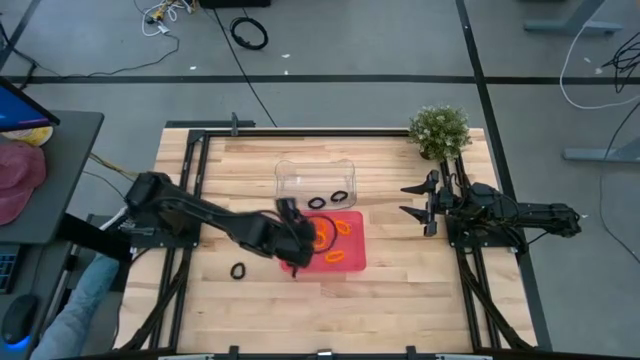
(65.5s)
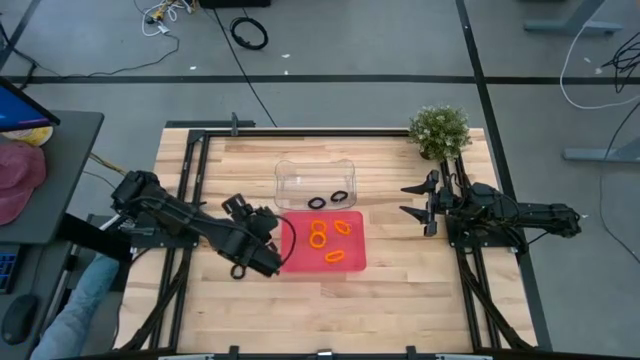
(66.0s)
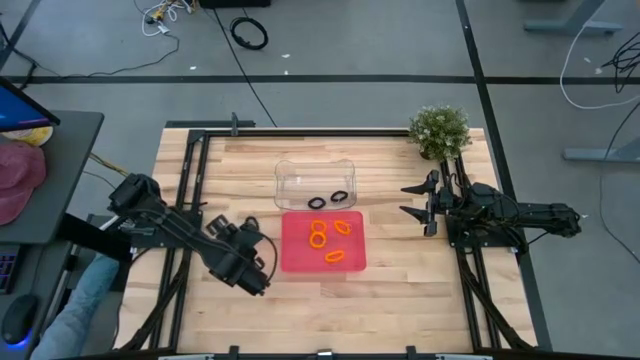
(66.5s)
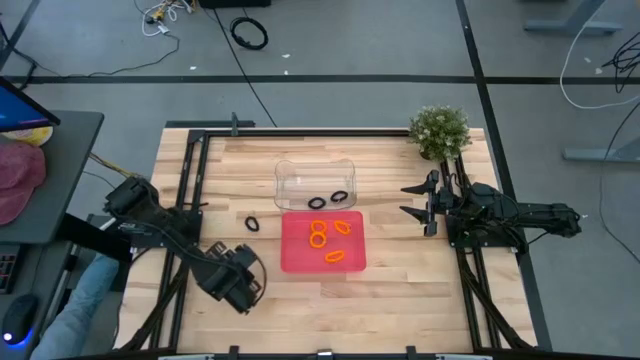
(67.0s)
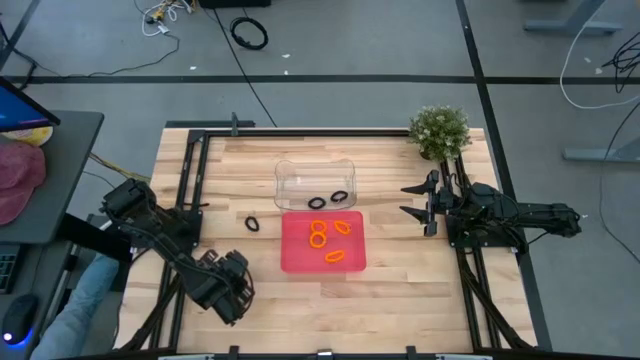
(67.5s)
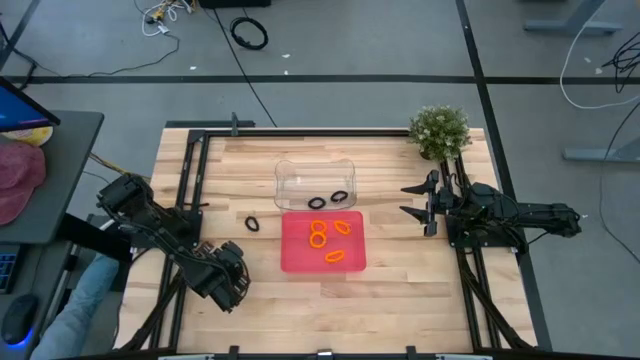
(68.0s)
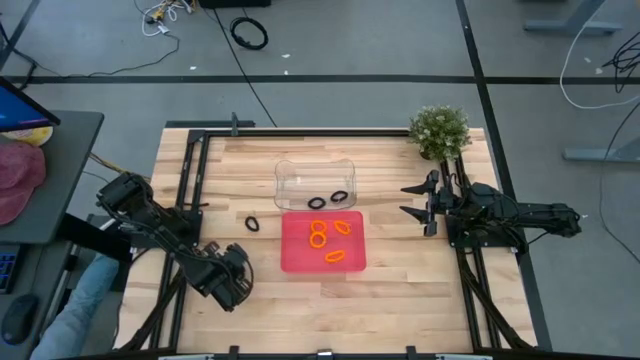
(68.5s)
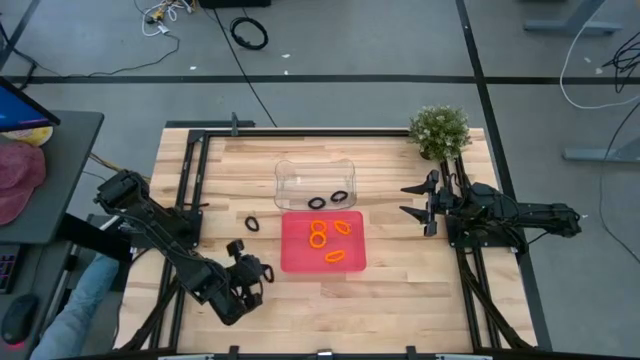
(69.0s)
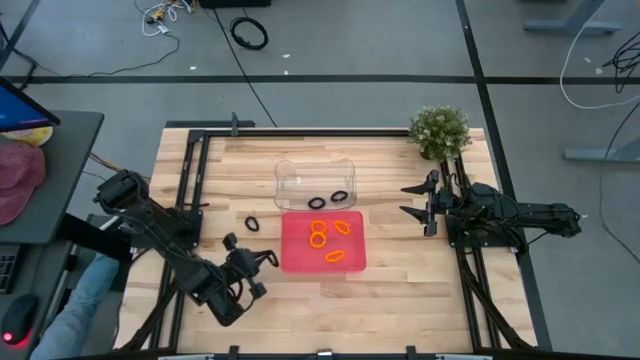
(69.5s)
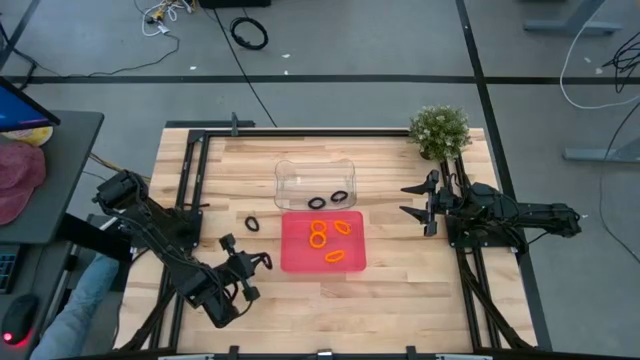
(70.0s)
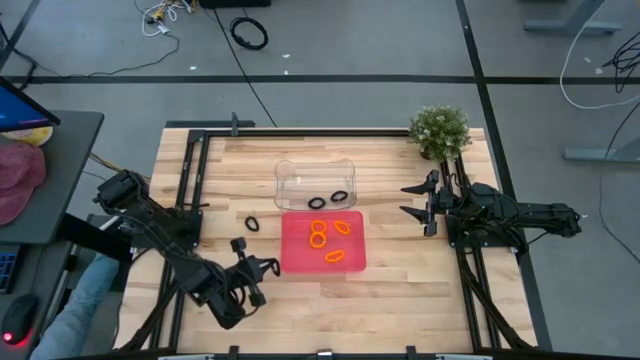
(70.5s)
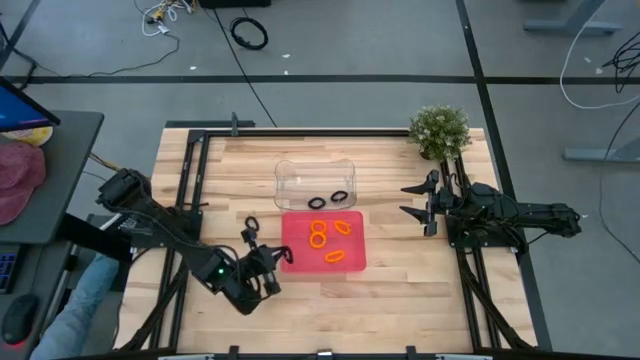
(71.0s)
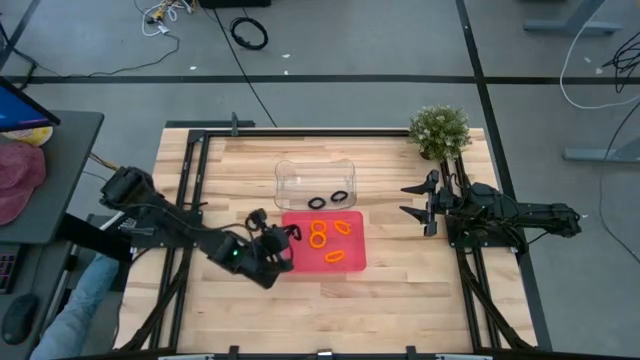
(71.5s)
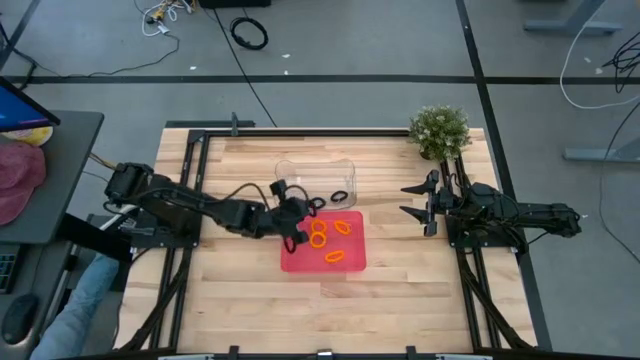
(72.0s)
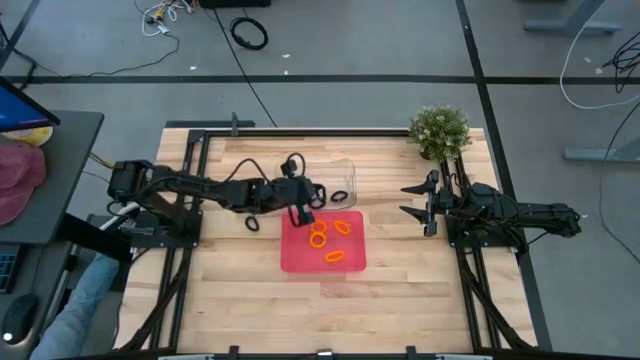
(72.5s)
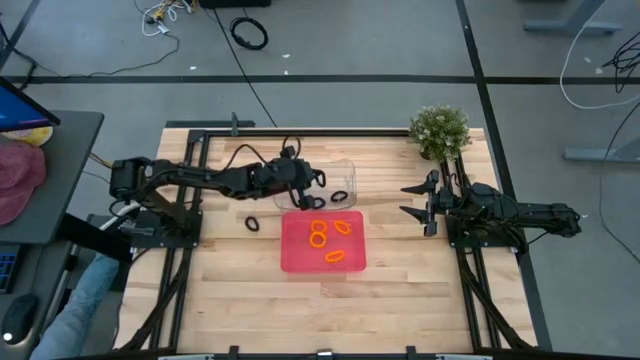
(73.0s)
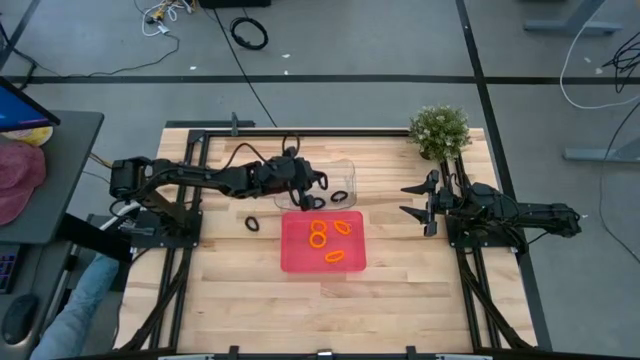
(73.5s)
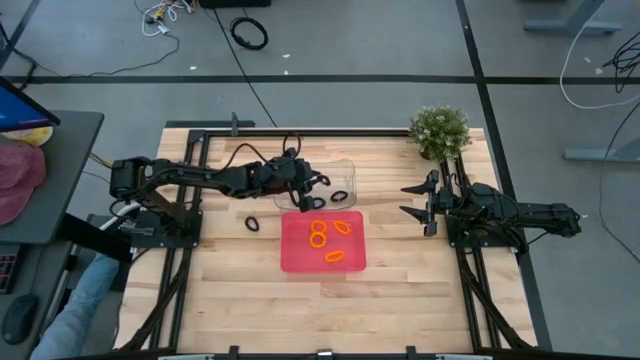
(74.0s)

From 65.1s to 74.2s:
Task: Sort spring keychains
Put the bottom black spring keychain into the transparent bin

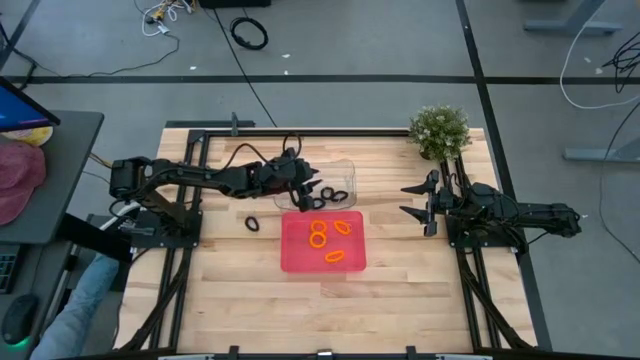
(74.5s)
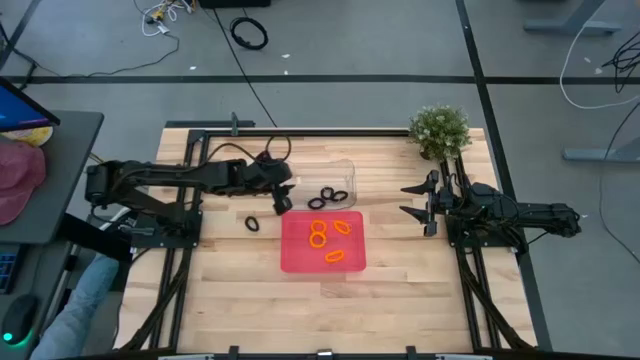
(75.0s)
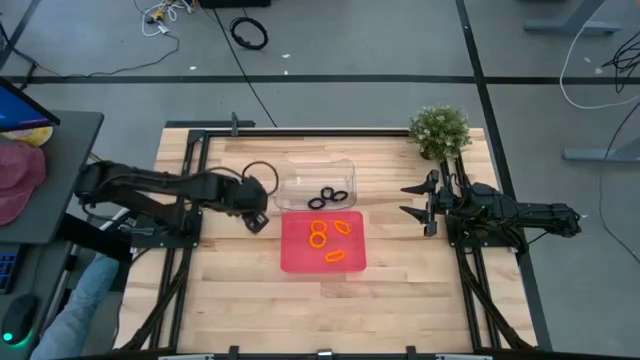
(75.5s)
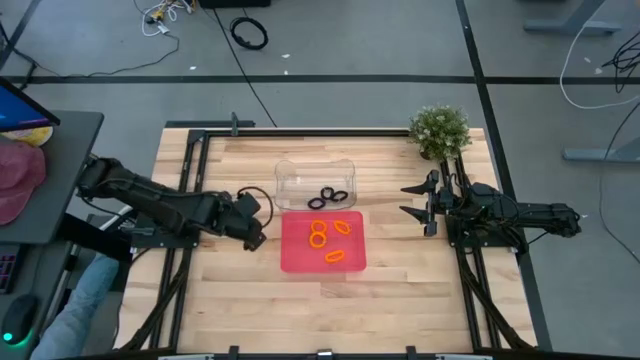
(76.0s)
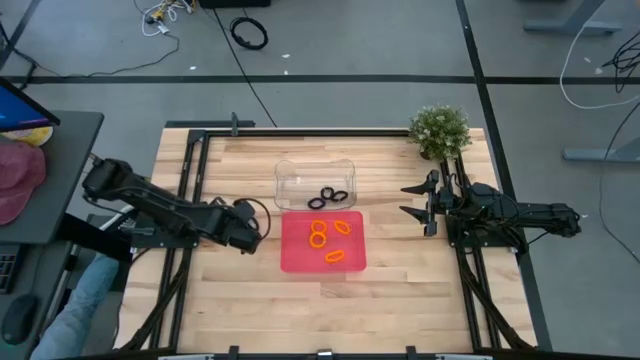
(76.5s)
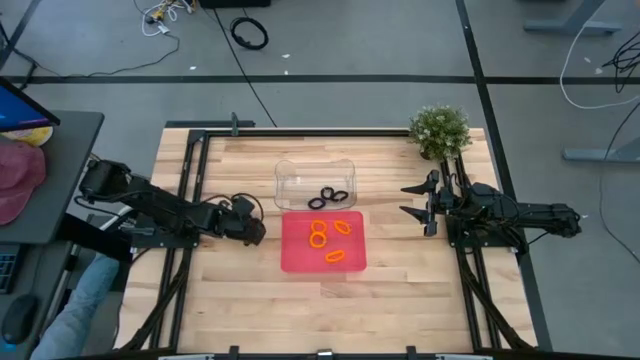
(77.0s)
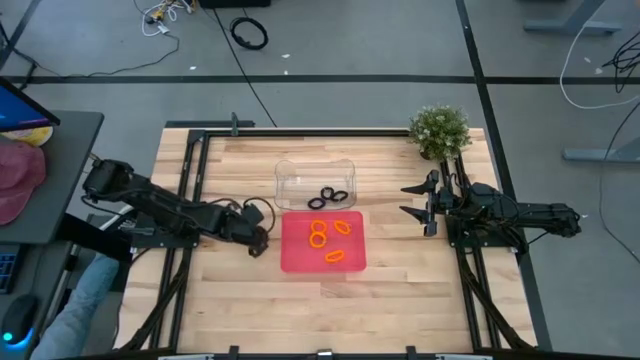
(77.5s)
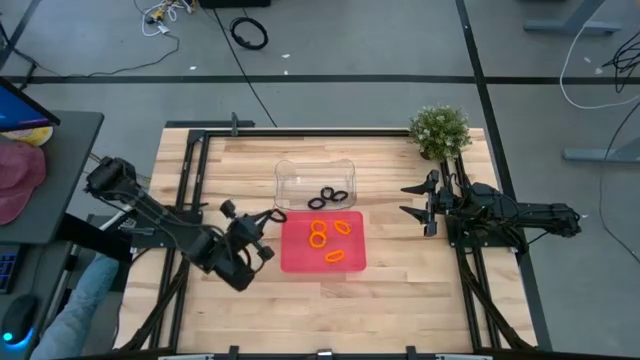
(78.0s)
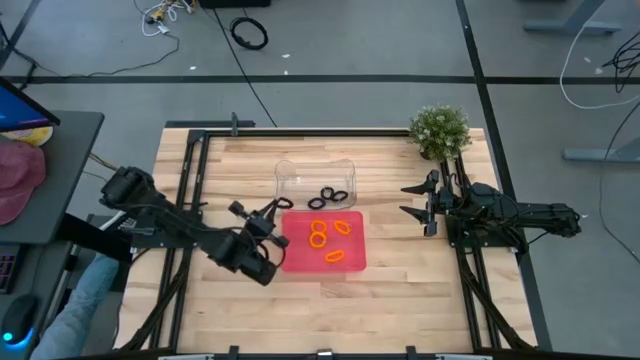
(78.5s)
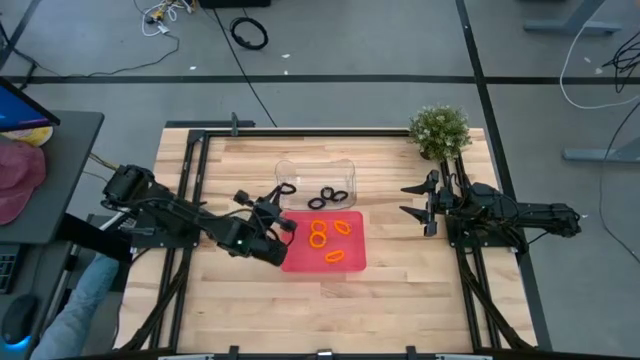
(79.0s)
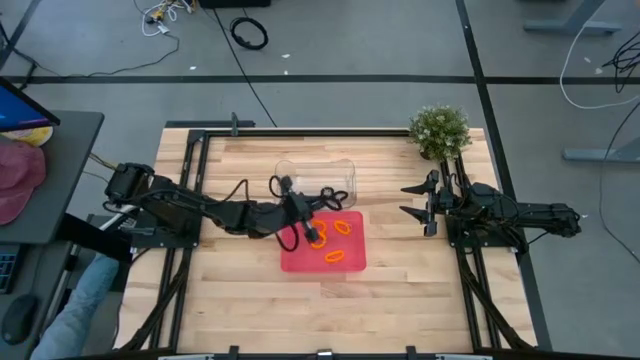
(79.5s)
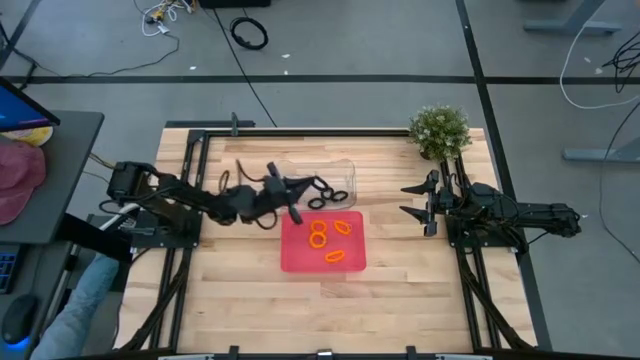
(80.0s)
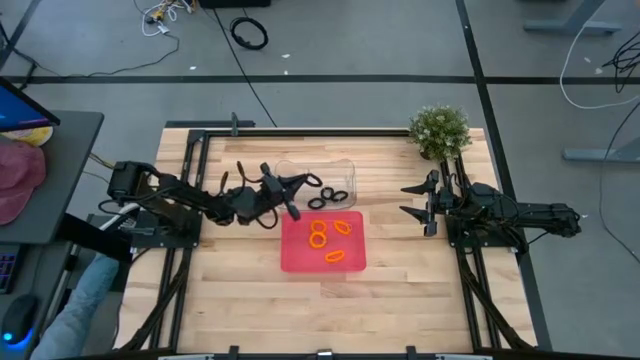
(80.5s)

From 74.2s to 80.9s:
Put the black spring keychain into the transparent bin

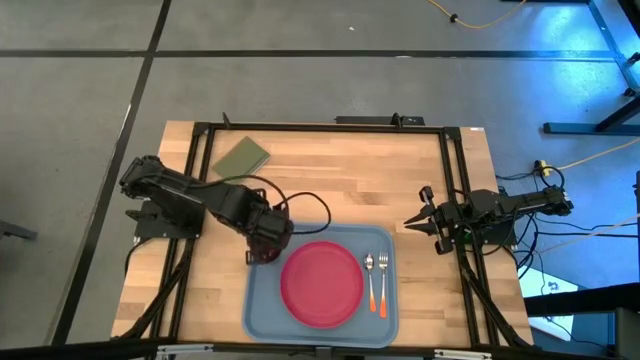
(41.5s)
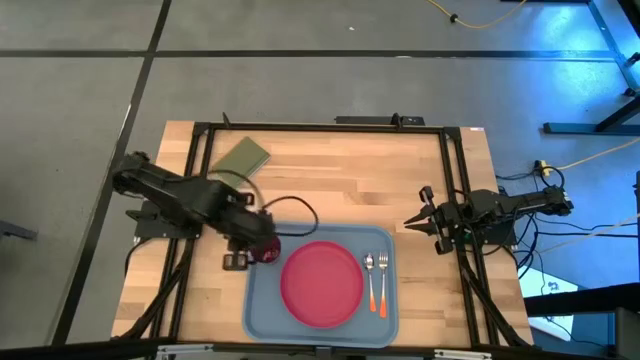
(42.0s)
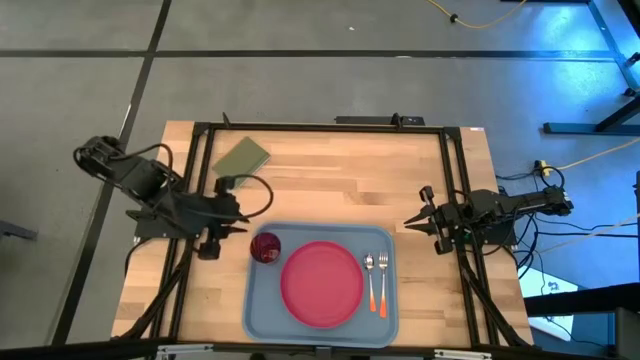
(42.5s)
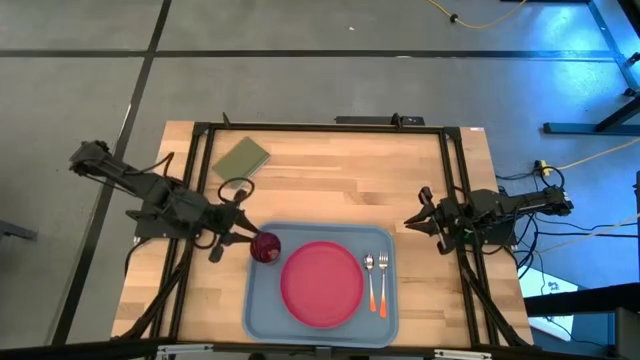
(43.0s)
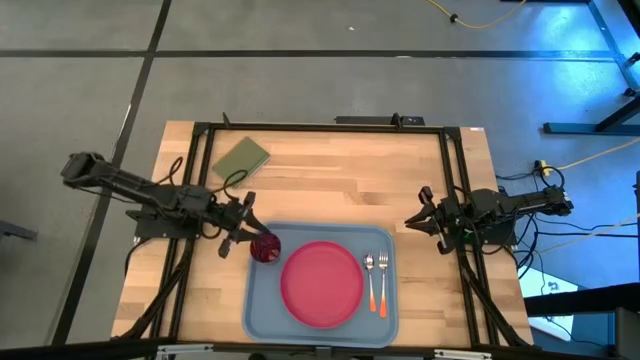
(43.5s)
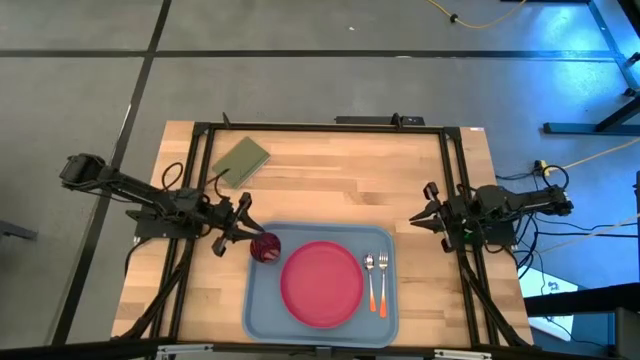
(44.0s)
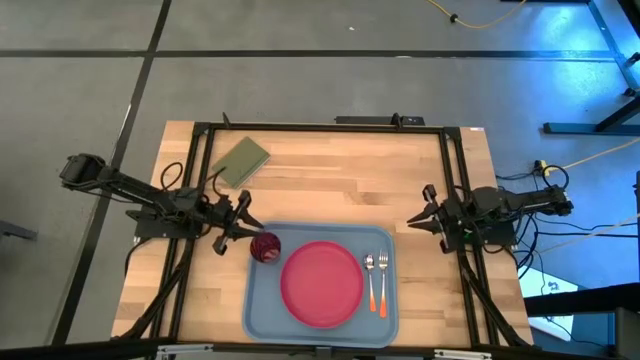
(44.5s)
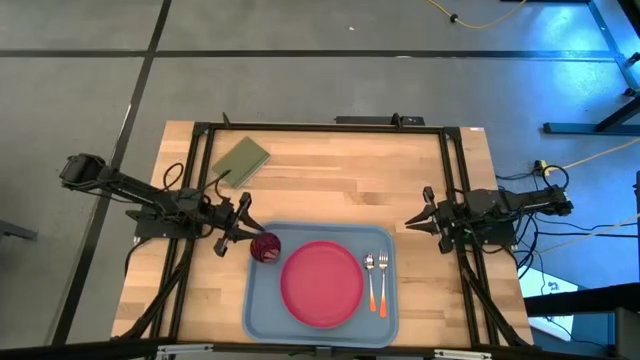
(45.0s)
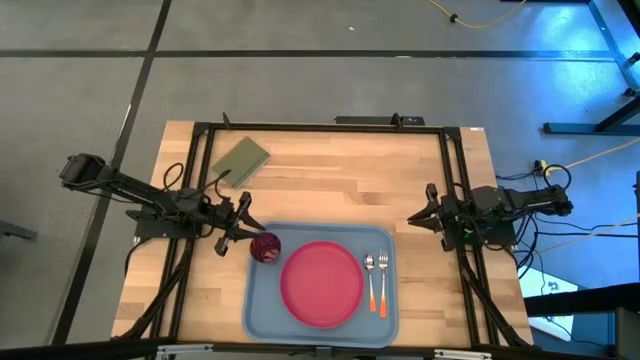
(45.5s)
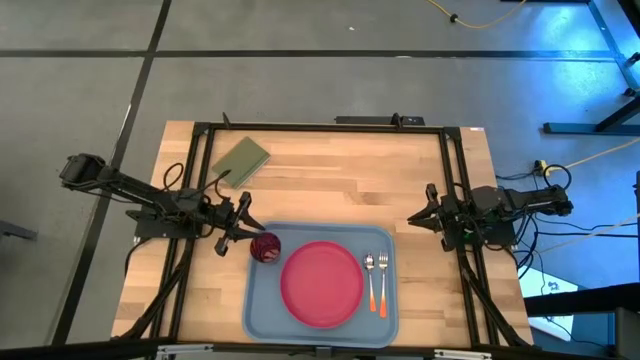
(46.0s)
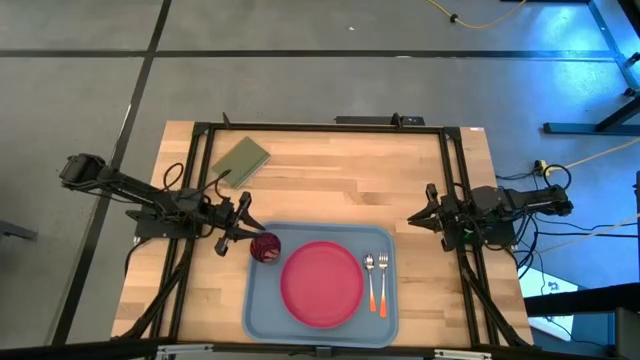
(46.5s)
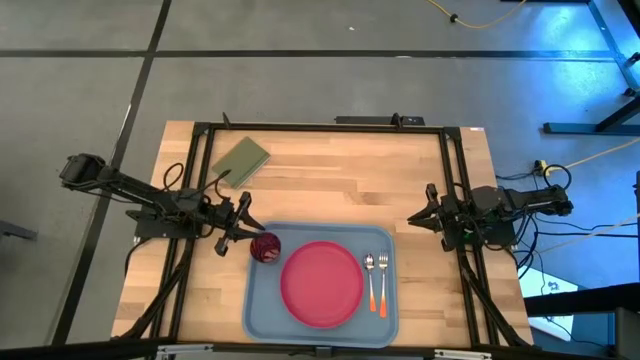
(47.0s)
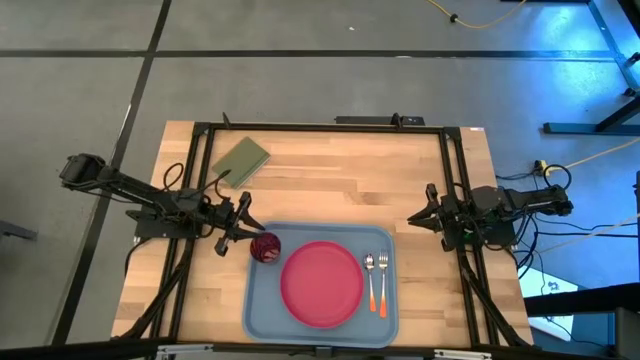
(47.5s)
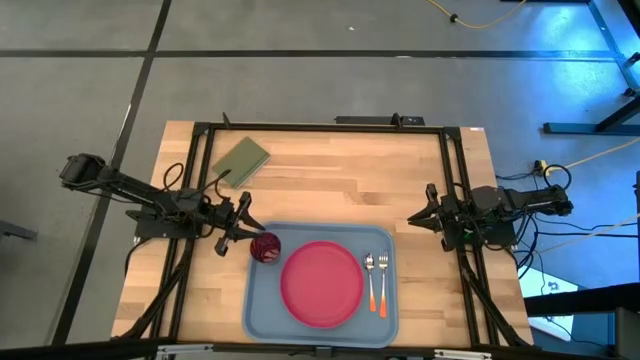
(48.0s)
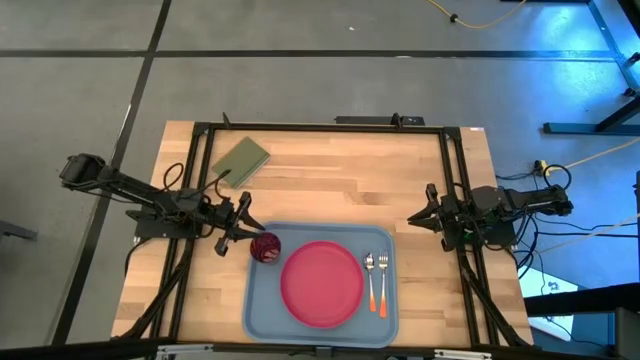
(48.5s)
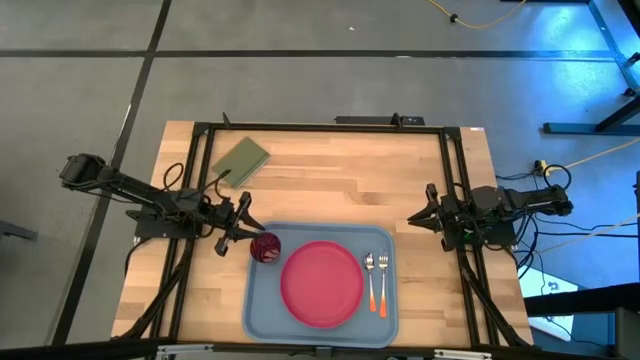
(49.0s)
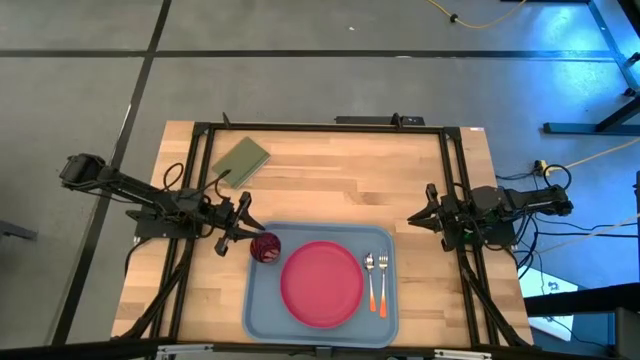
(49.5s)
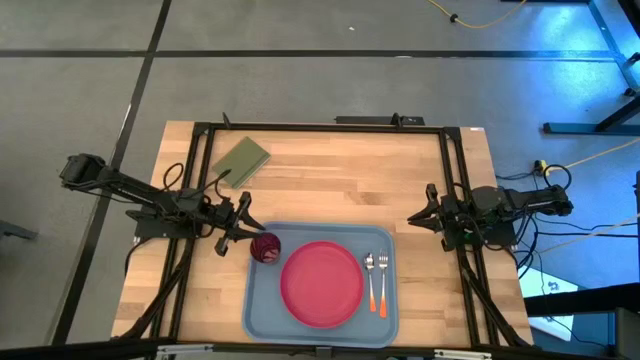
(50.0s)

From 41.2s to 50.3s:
Task: Pick and place plate/cup/fork/spoon on tray
Return to Home Position
